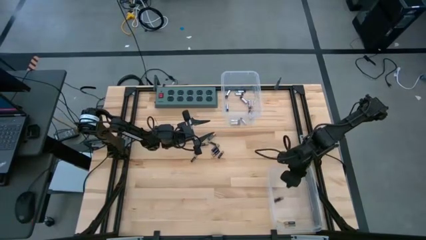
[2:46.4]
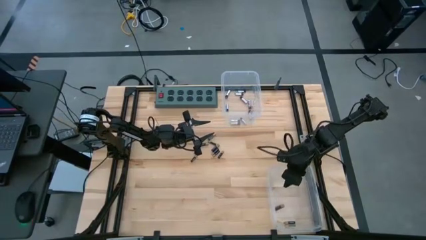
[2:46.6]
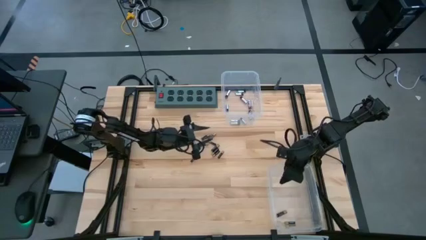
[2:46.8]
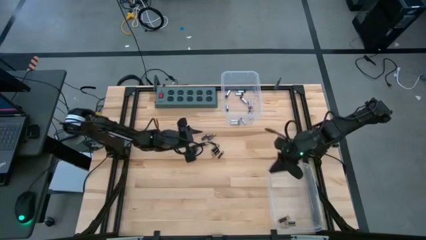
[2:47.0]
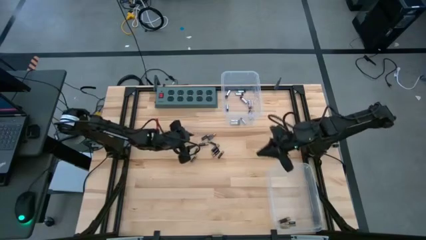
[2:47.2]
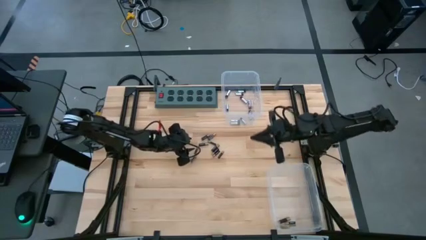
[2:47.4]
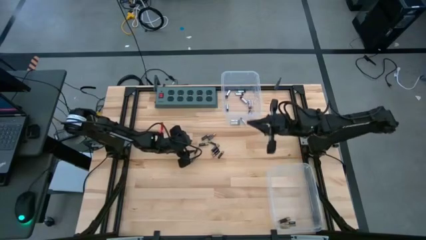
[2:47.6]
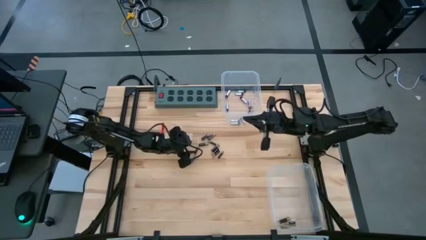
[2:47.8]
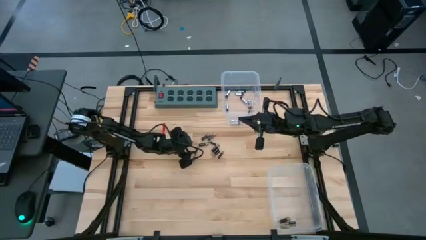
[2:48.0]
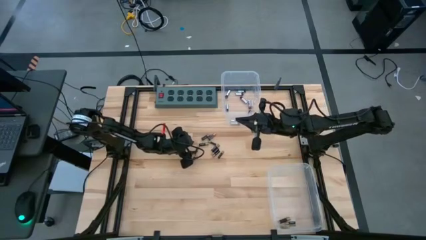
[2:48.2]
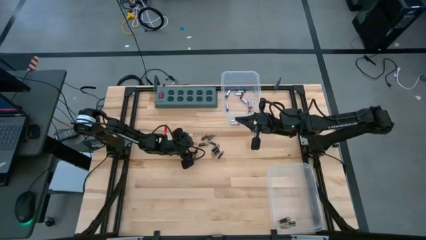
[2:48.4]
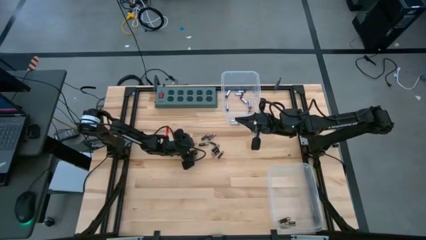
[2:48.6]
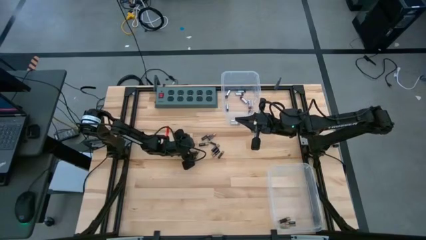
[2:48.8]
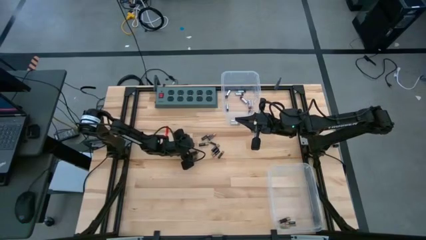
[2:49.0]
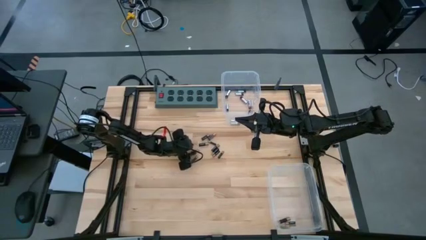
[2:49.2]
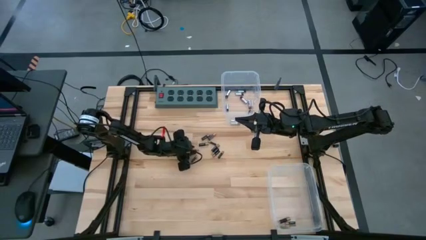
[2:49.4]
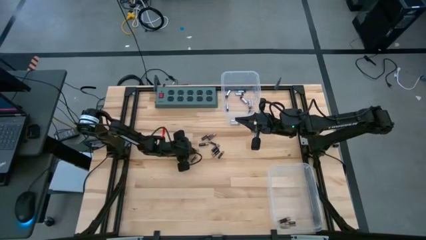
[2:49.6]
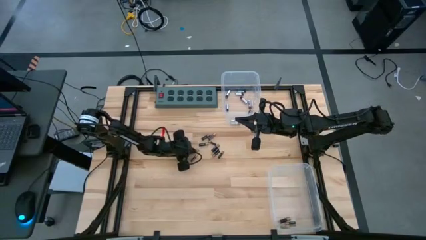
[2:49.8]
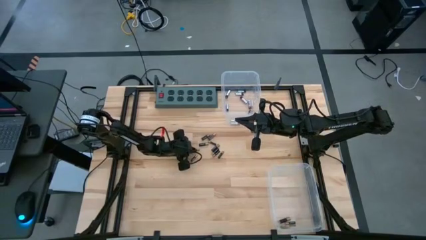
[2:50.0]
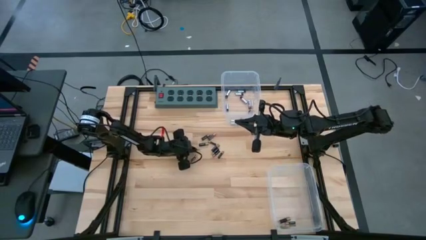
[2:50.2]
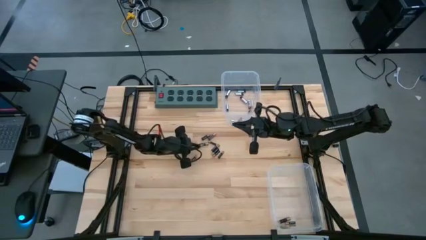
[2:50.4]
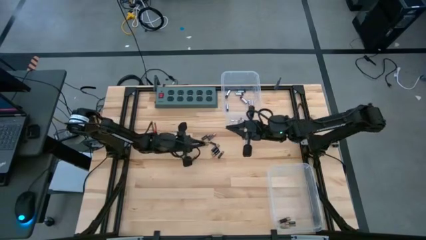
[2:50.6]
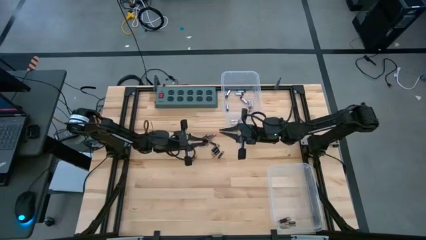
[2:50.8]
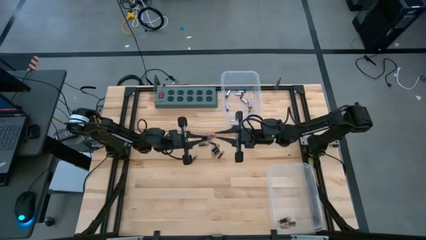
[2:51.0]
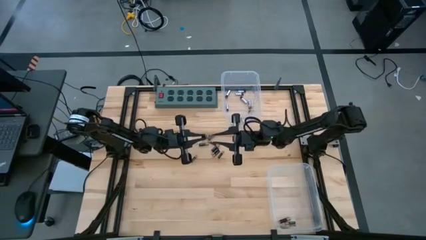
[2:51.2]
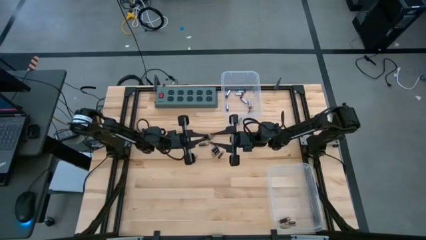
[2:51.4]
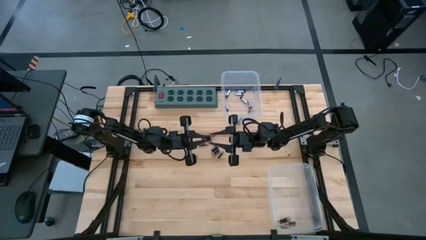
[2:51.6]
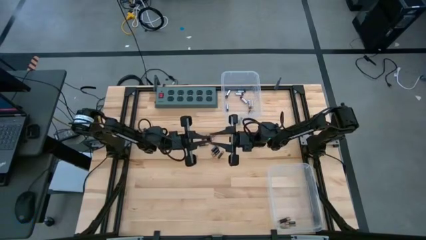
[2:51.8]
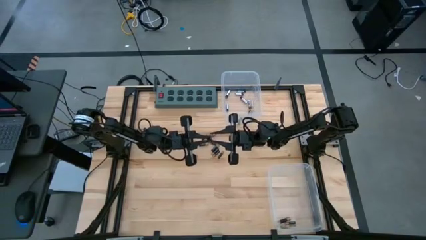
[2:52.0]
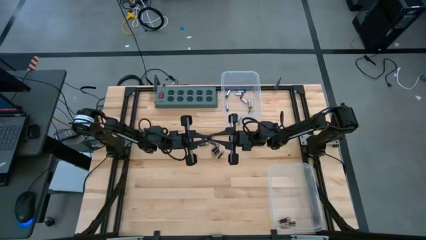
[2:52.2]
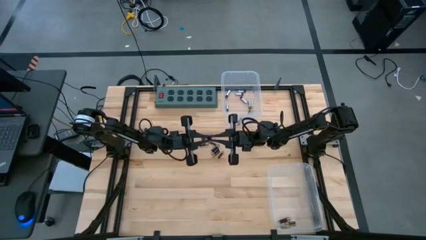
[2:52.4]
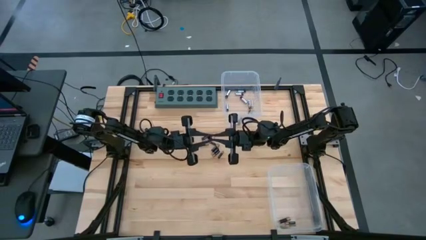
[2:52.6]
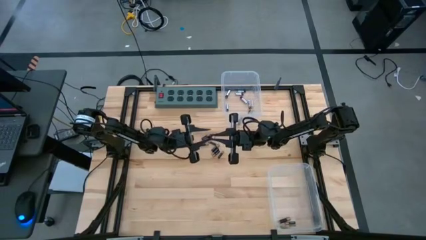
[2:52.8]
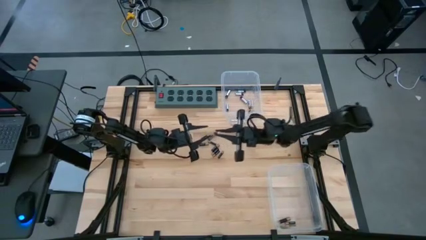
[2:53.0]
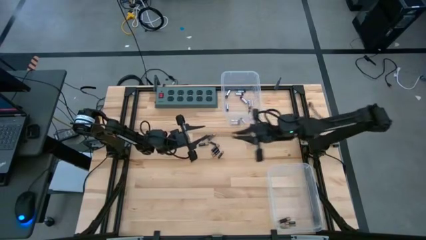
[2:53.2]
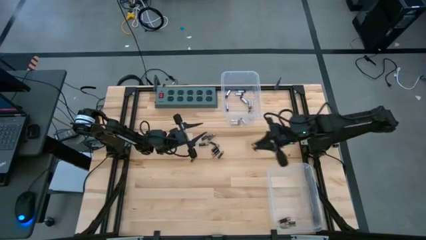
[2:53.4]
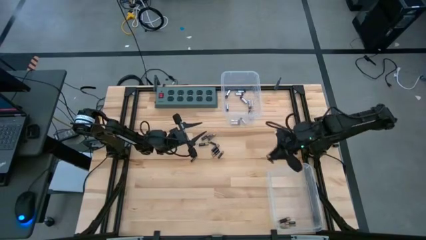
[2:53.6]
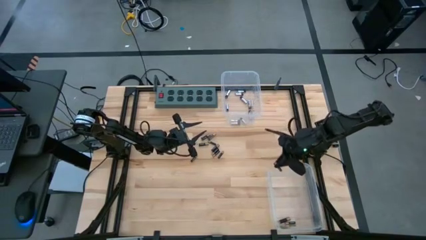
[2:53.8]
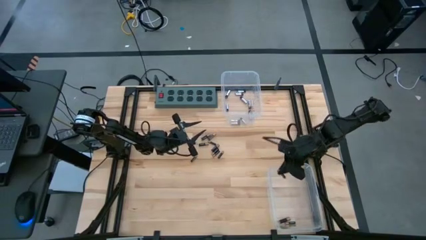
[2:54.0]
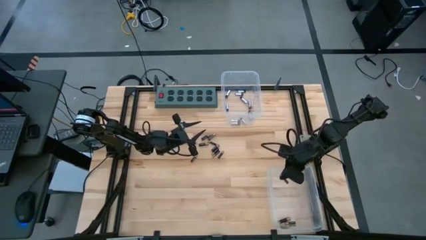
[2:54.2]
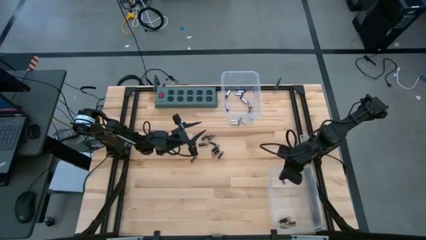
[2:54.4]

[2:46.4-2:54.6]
Task: Sort batteries
Put the black battery into the bottom transparent bin

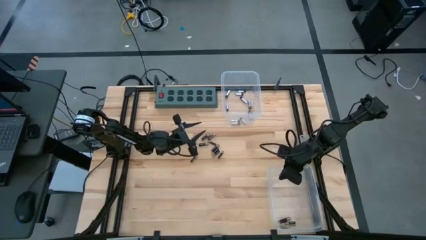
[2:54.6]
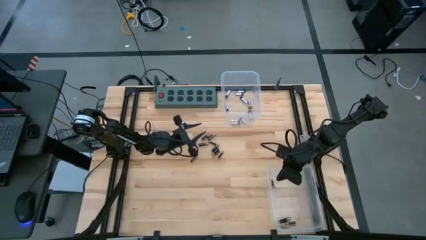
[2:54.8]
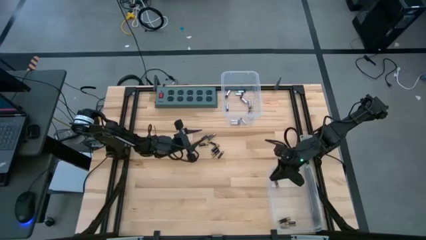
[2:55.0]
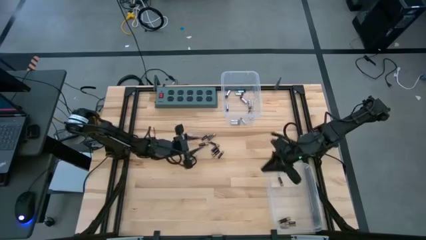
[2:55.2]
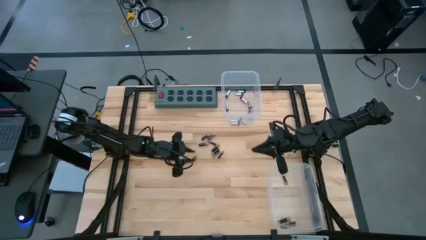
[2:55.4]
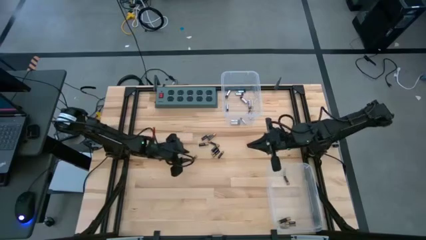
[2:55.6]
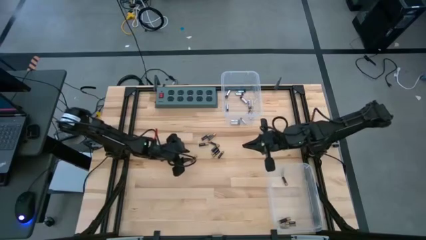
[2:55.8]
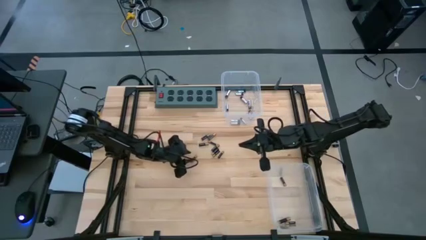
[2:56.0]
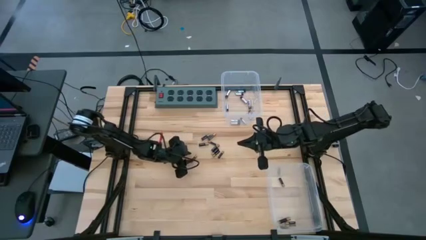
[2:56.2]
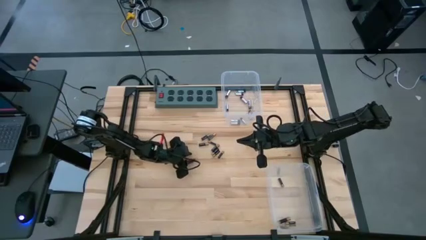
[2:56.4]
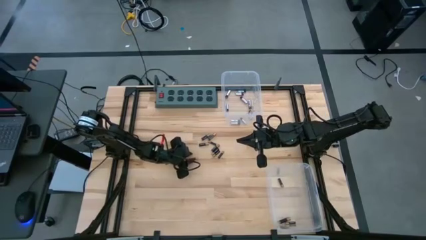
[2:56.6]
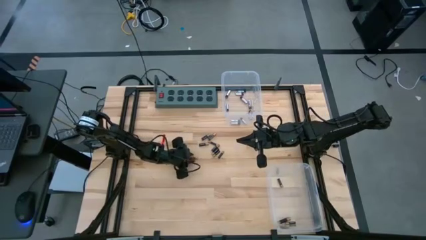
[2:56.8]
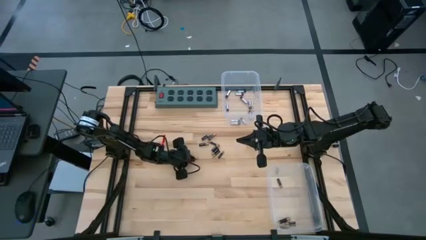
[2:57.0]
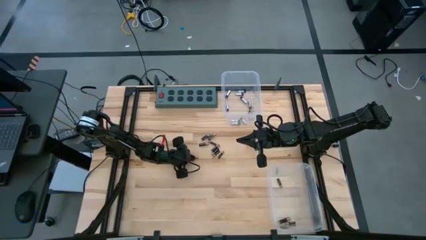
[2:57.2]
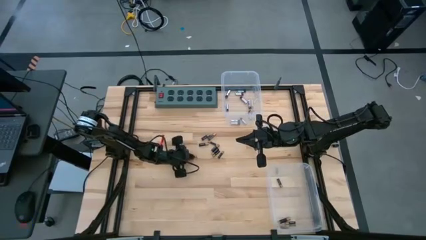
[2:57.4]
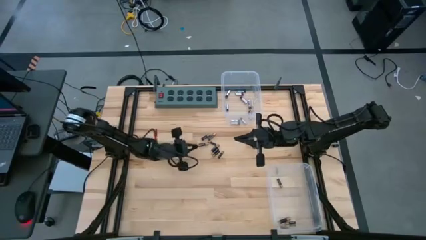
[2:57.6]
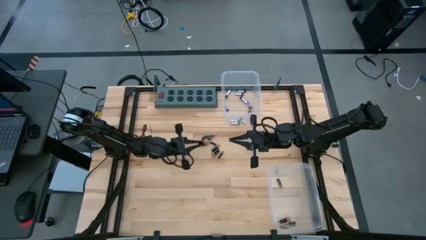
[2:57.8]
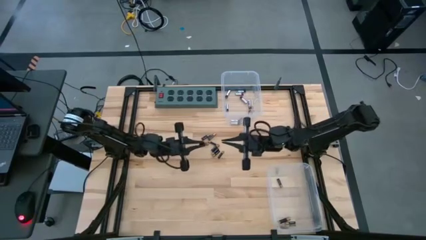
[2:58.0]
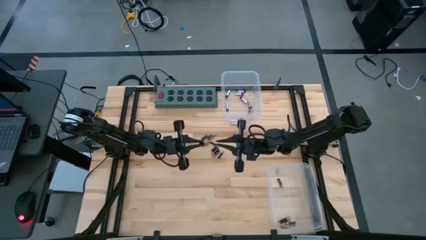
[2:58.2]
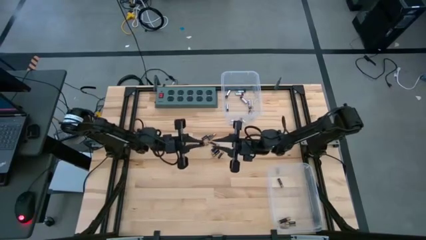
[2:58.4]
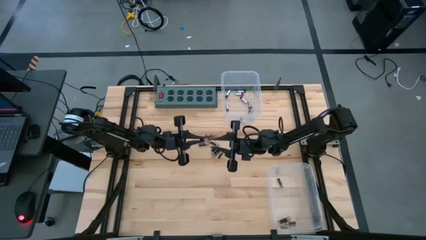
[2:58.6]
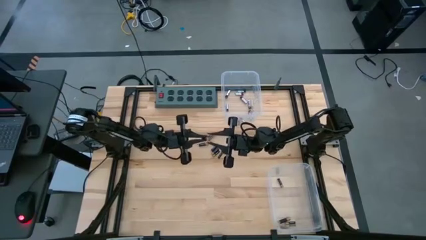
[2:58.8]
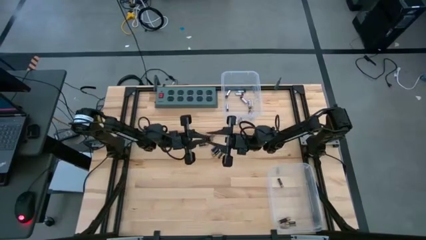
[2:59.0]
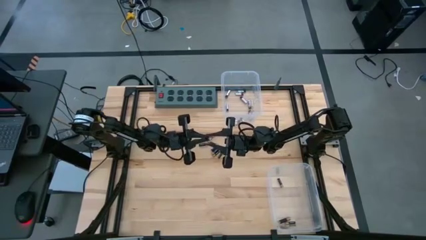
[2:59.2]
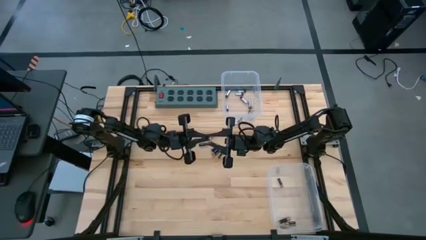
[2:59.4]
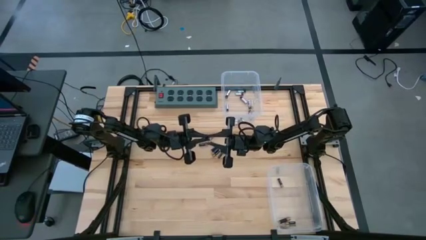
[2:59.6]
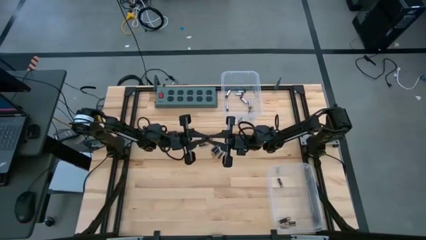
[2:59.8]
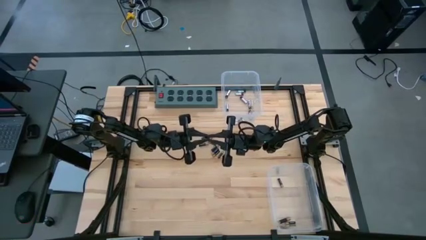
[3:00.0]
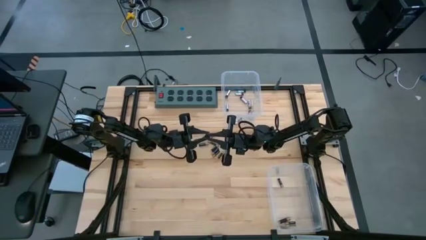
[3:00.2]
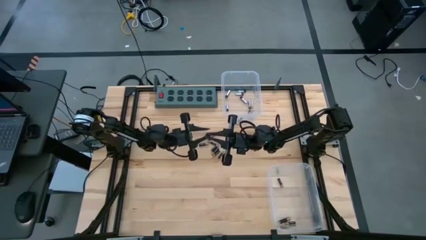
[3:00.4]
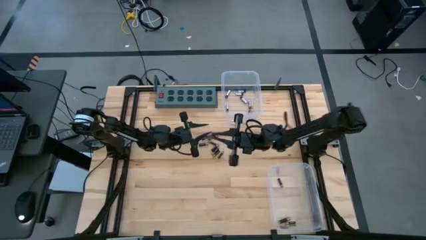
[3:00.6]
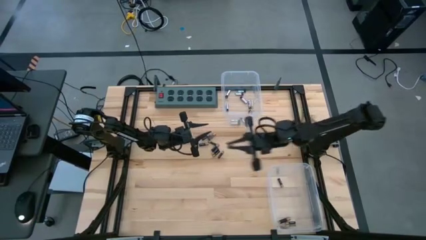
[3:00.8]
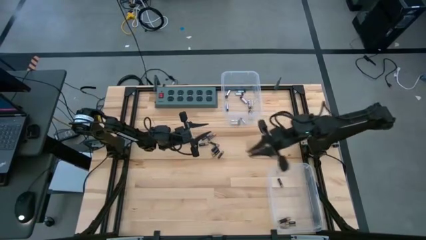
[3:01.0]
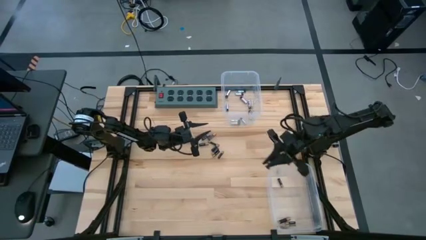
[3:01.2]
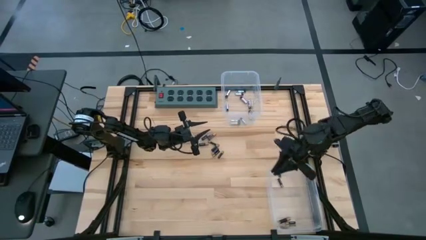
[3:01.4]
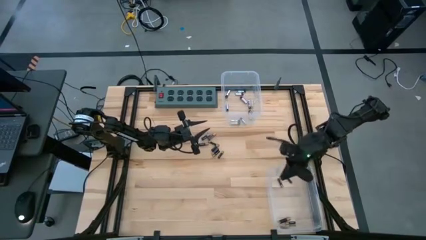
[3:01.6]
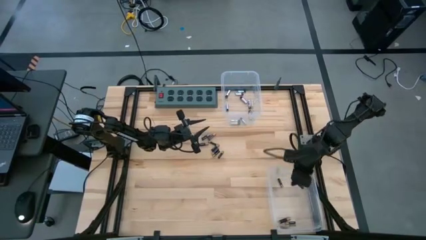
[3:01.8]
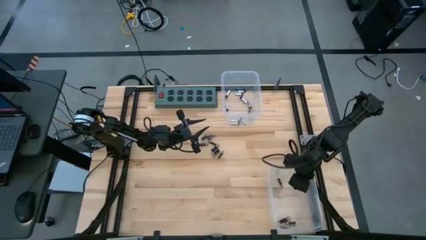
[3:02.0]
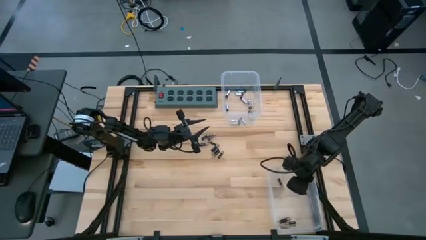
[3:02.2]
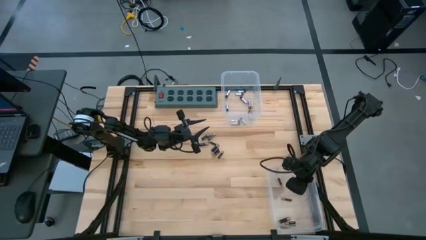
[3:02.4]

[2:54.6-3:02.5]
Put the black battery into the bottom transparent bin

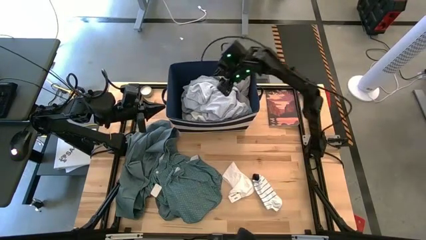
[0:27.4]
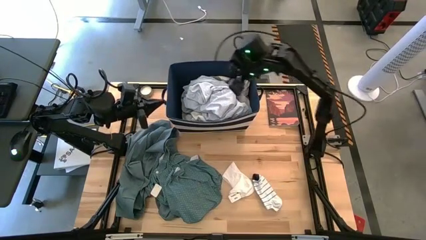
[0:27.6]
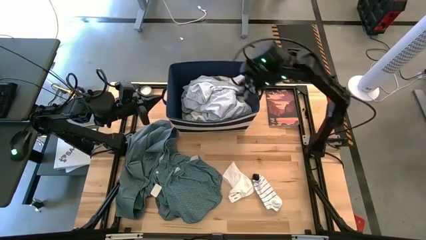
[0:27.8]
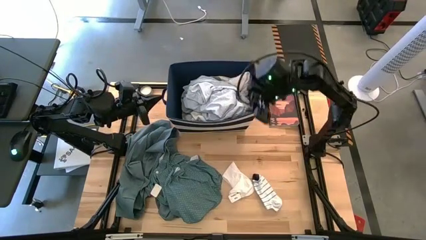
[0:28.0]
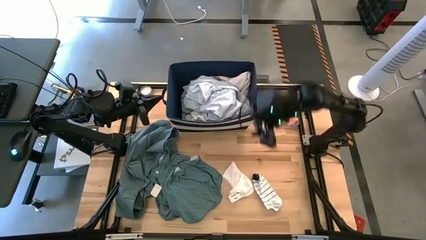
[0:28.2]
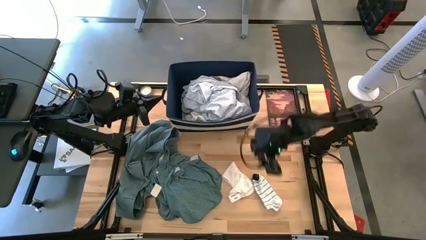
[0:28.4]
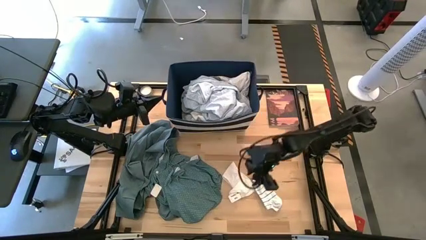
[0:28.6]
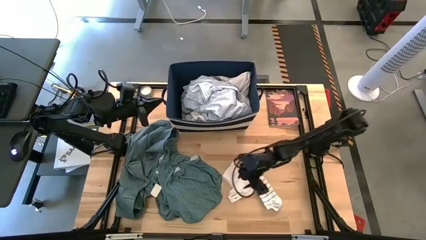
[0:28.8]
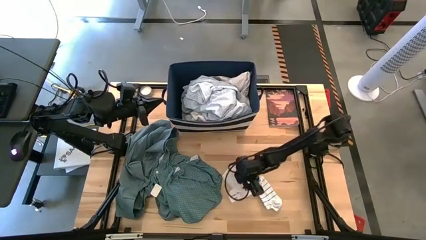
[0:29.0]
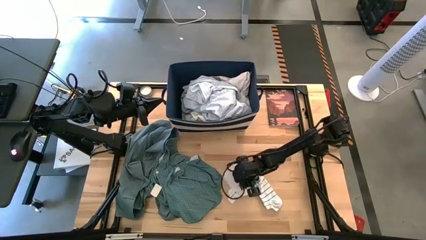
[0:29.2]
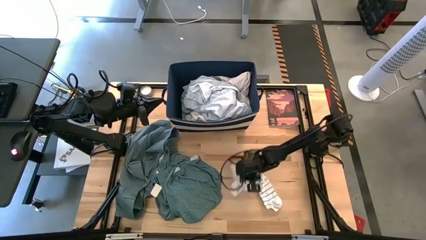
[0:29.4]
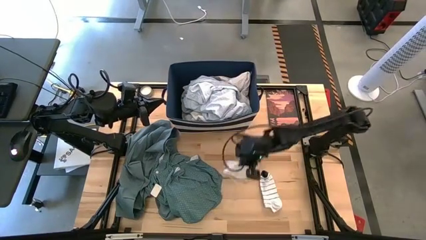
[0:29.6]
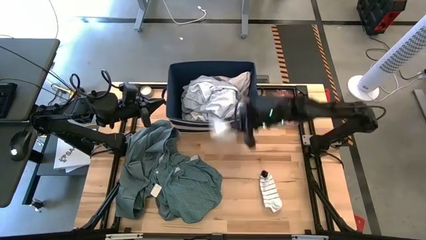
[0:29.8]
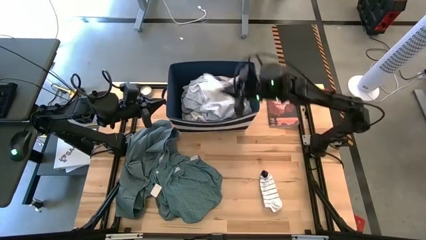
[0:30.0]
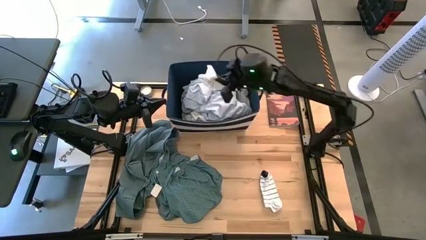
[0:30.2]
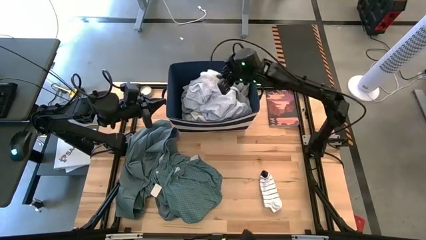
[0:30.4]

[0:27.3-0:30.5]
Task: Sort clothes
Put the white sock into the blue bin
